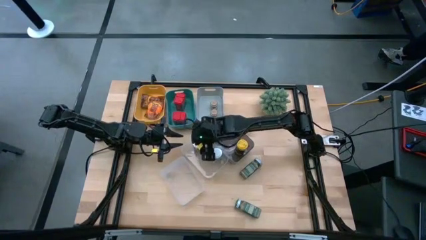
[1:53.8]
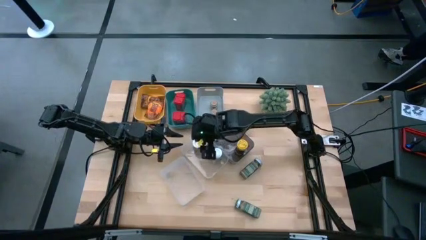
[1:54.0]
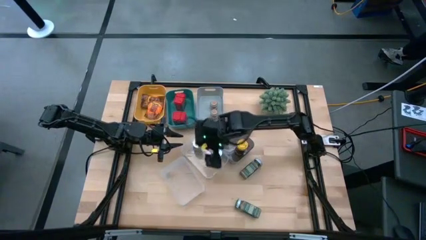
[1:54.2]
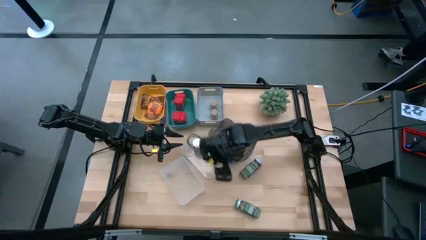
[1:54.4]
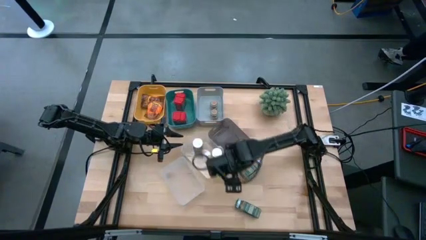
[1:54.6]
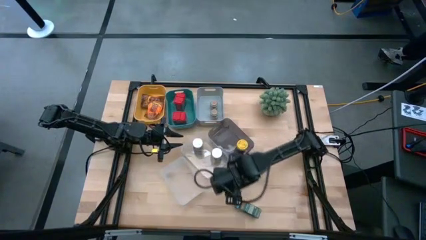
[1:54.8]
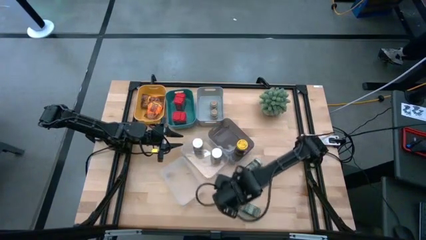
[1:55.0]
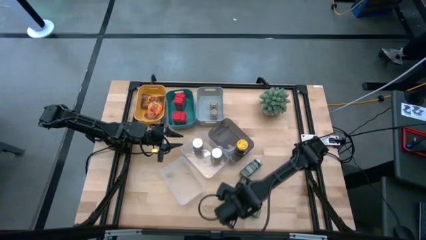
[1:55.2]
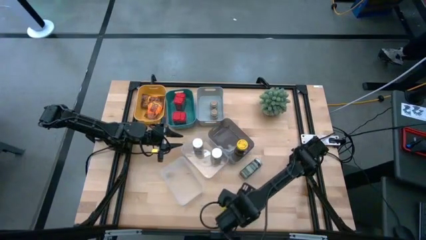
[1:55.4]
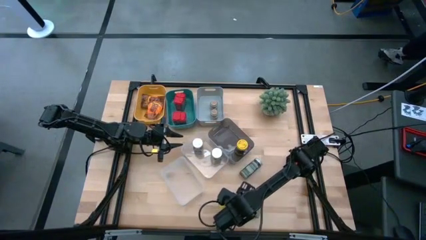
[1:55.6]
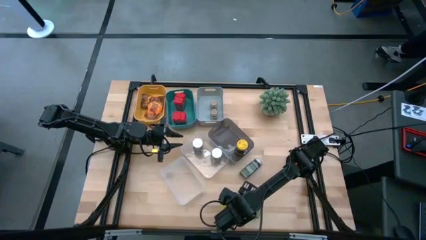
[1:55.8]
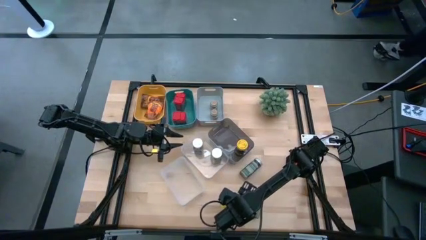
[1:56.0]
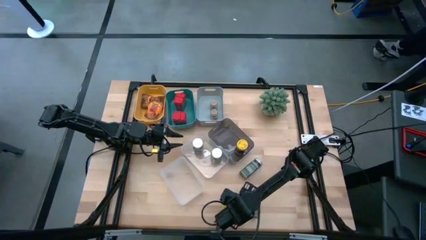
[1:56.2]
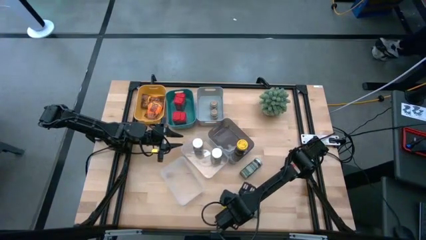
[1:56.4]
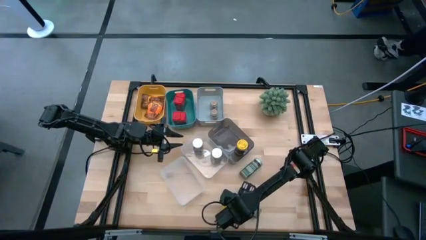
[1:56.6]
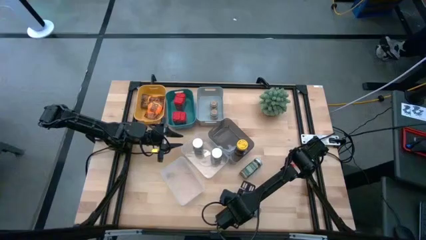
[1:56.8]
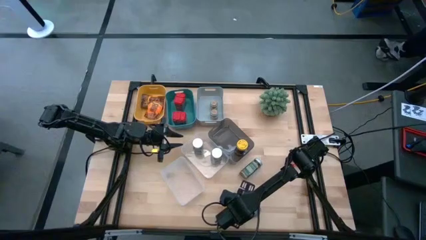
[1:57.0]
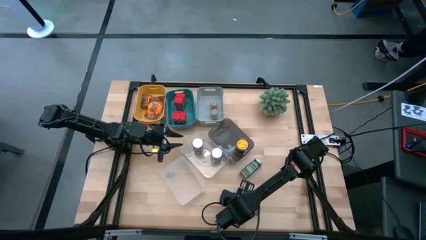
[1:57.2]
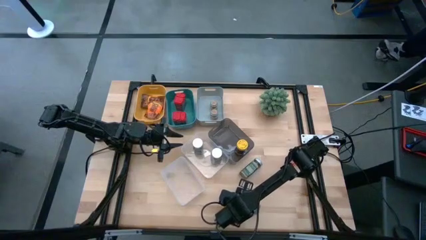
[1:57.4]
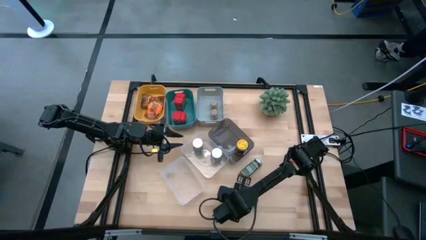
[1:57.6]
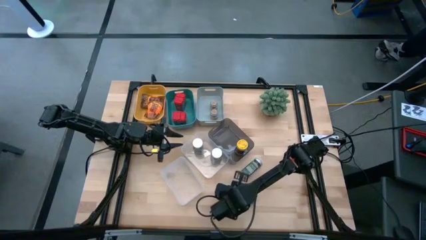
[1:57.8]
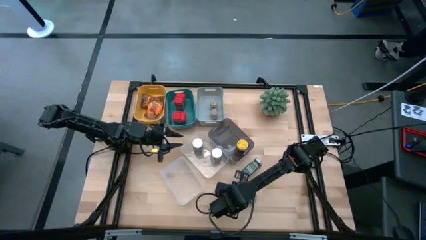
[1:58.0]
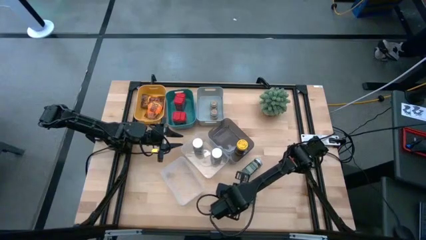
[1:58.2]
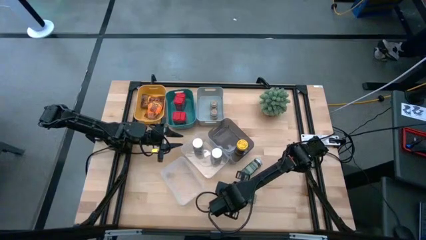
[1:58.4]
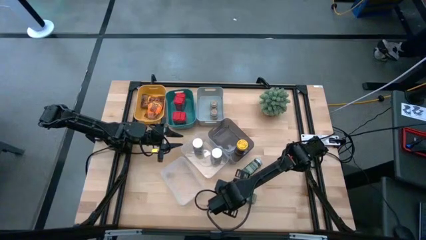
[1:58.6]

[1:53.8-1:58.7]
Task: Sort spices by type
Put the green seasoning bottle into the bottom transparent bin

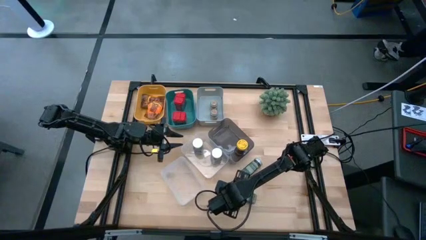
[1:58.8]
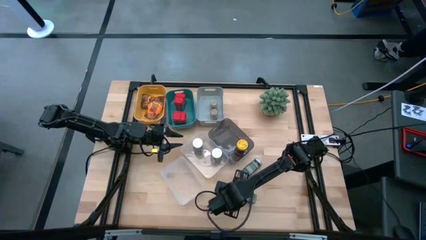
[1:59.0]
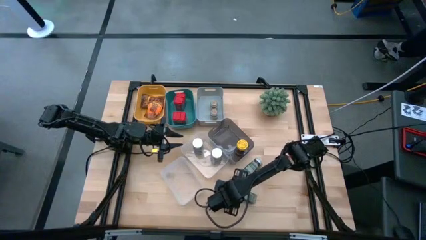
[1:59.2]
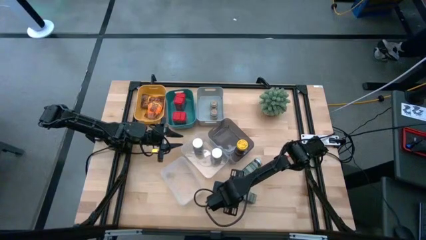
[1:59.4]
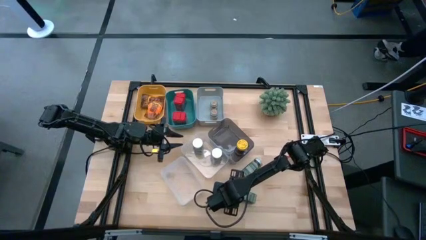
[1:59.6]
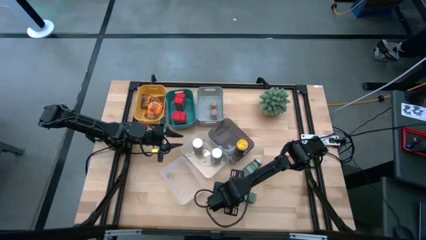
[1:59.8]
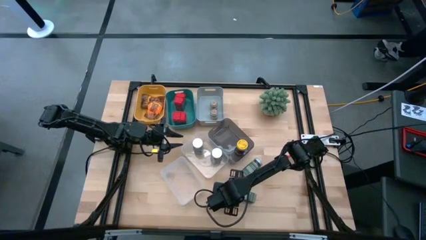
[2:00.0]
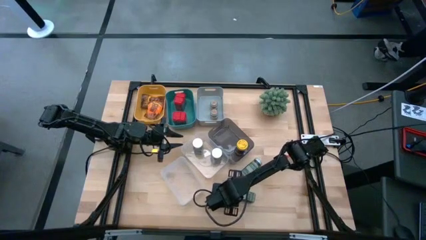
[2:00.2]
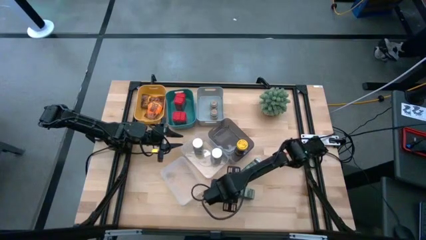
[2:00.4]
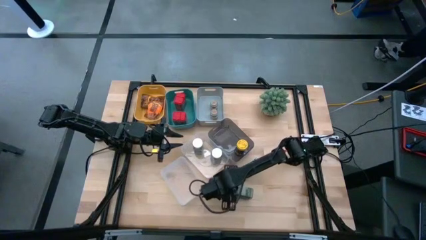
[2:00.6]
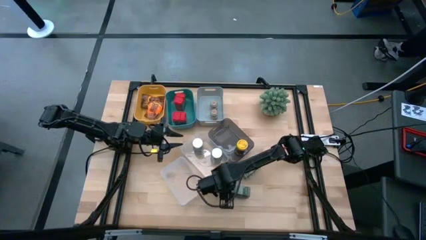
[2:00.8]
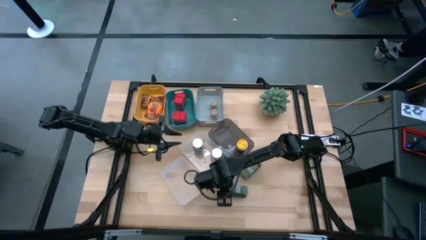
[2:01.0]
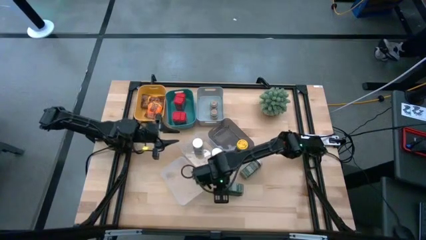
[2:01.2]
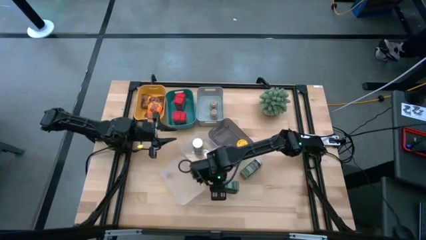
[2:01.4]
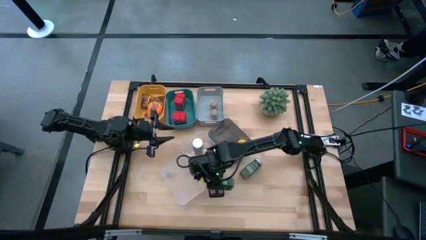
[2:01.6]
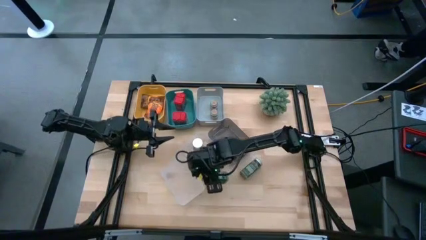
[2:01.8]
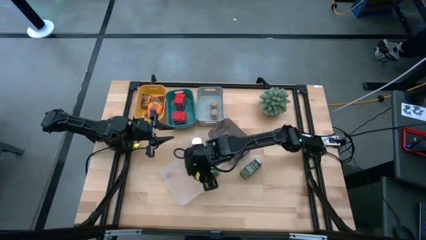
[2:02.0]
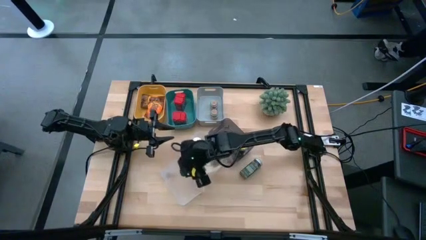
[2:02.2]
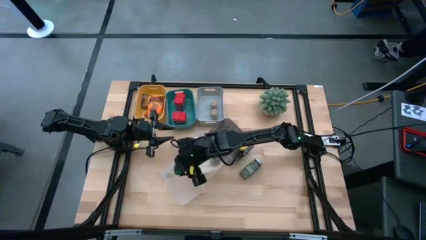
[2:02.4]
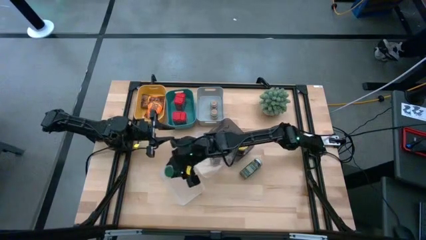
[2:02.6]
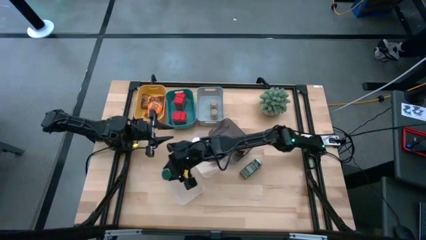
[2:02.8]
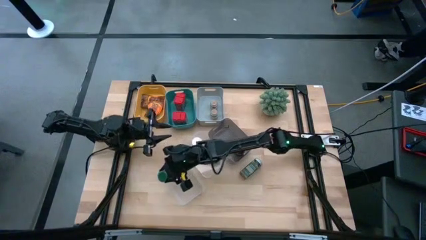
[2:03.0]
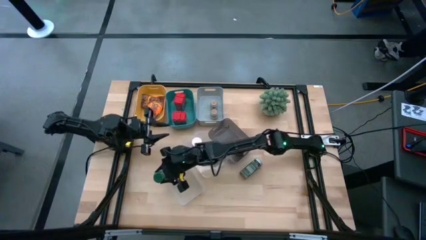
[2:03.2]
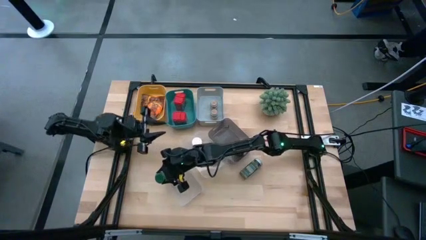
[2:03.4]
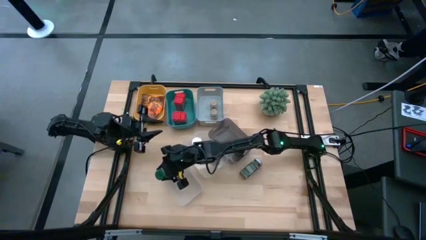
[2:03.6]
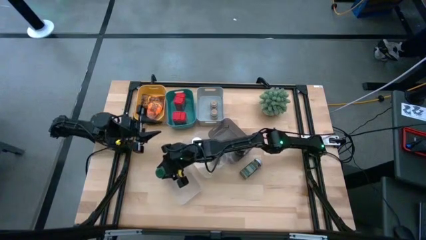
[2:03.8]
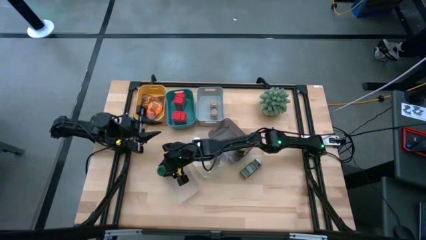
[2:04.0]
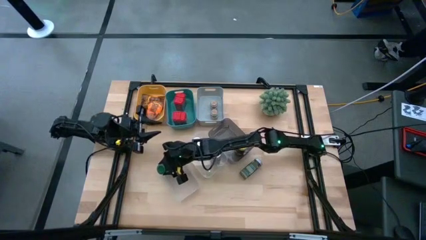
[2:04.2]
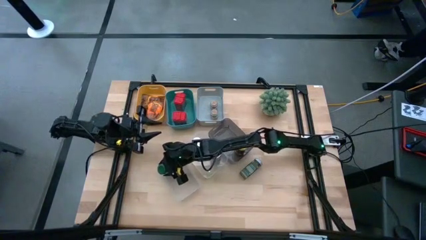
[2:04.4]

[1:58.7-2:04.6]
Put the green seasoning bottle into the bottom transparent bin

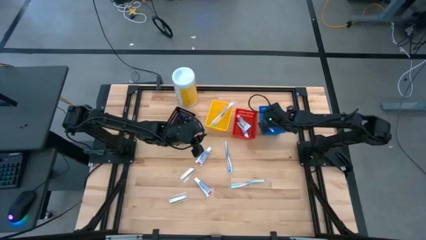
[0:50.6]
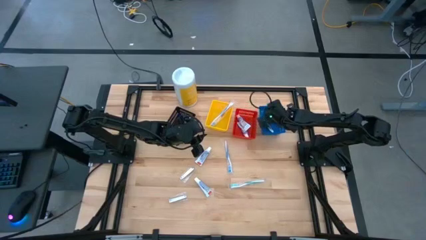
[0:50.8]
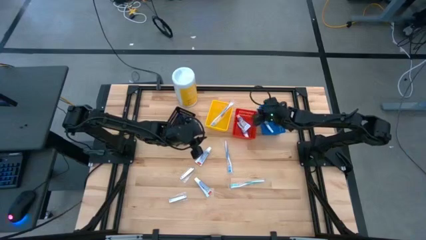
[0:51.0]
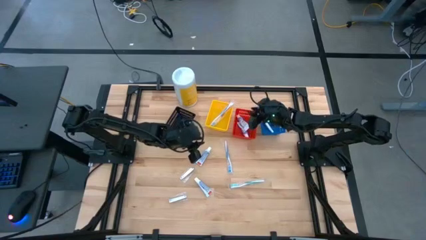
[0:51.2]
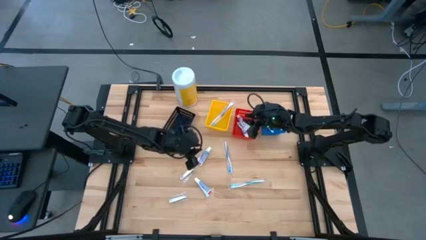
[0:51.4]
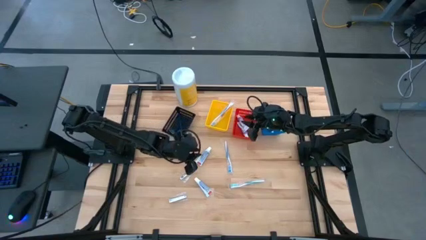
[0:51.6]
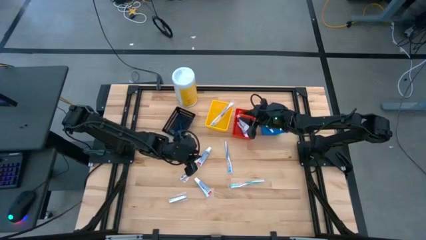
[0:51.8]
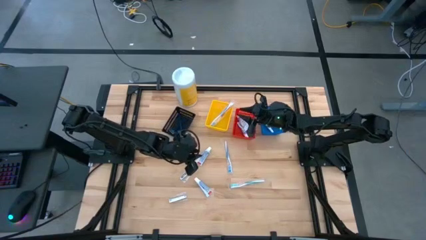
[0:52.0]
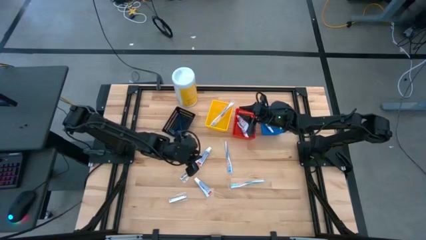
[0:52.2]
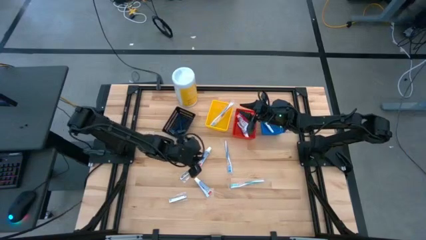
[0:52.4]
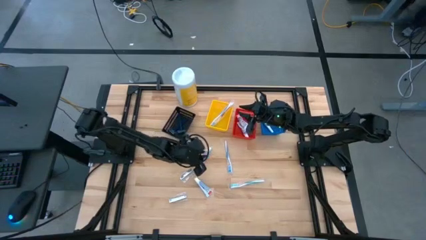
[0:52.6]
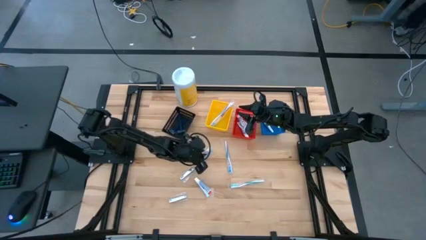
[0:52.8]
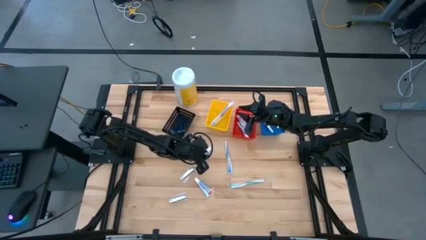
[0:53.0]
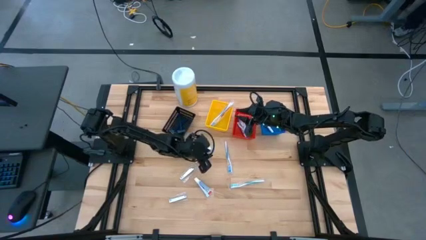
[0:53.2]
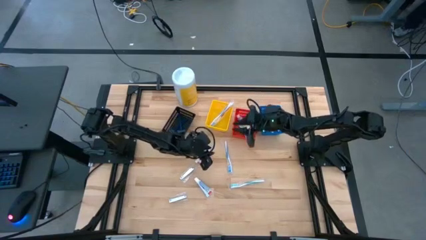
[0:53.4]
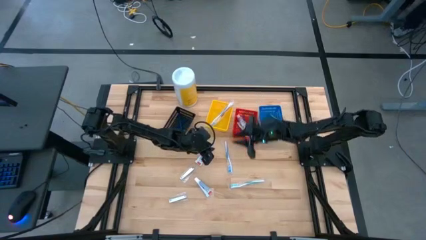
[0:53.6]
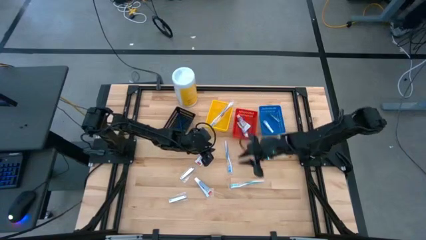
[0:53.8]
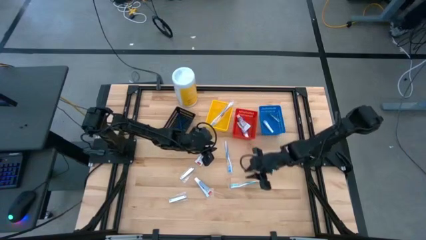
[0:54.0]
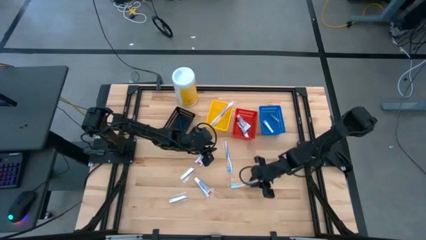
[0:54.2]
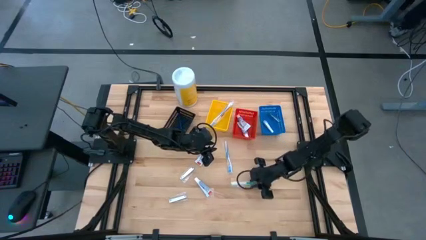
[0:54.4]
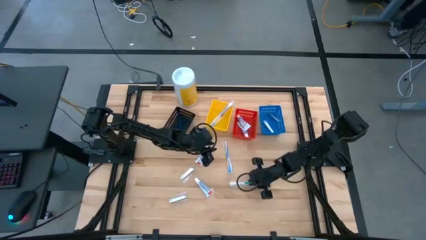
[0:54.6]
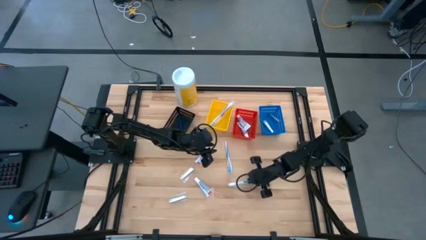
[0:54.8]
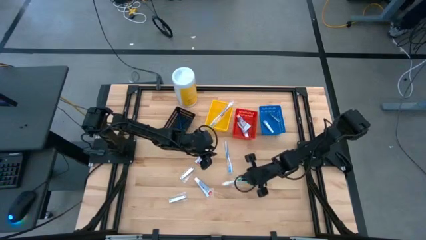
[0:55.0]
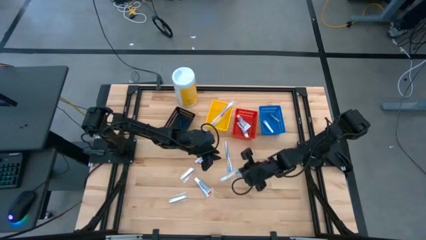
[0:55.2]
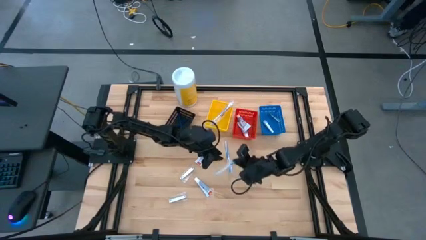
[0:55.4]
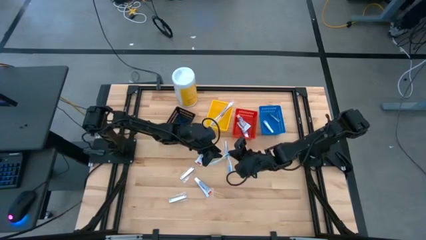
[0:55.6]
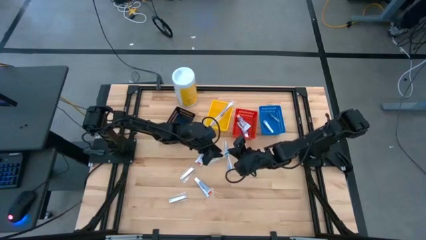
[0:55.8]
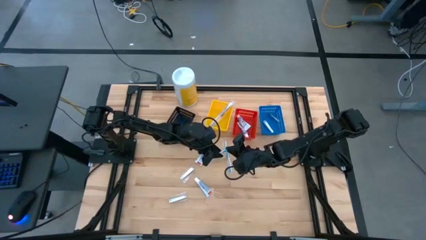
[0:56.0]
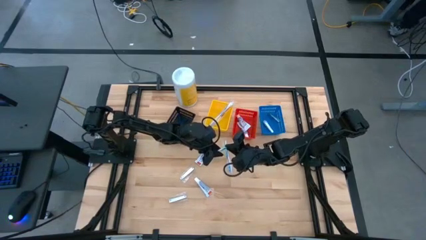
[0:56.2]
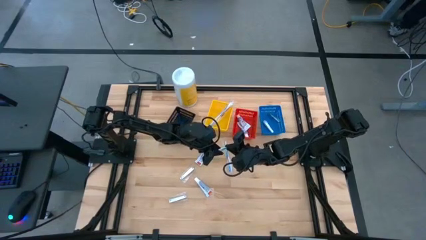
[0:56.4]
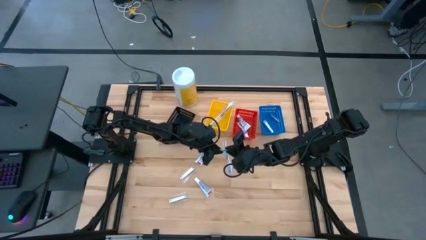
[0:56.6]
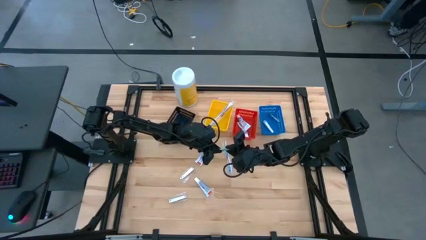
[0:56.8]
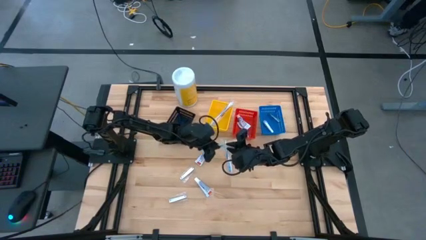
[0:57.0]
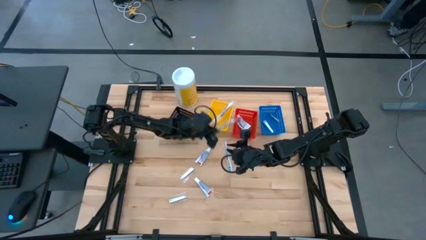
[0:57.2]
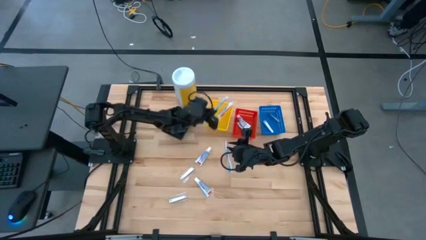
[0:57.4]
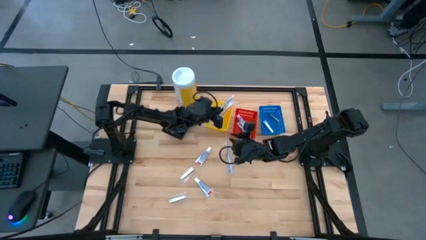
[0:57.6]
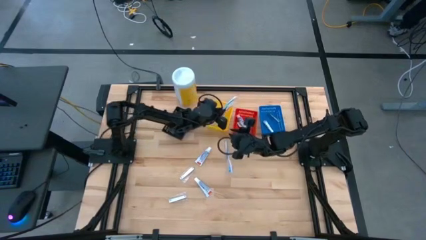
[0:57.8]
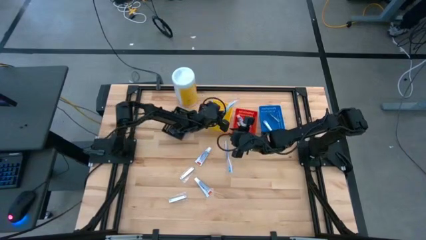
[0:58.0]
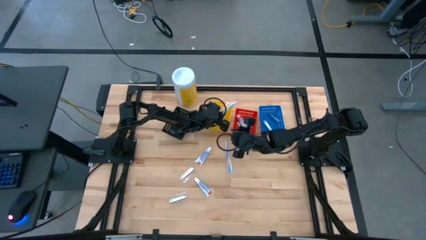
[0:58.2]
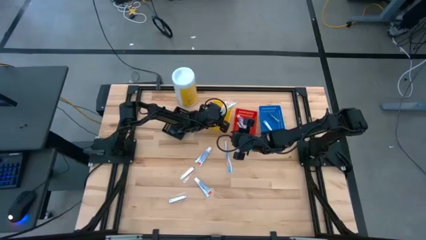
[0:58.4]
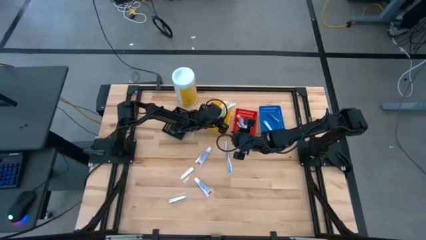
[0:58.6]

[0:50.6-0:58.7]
Task: Pick & Place Travel size toiletries
Put the green toothbrush into the yellow bin
